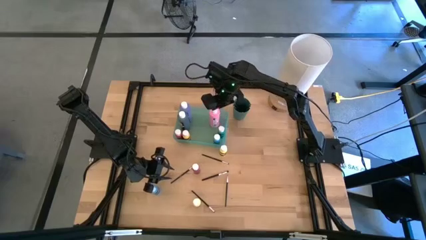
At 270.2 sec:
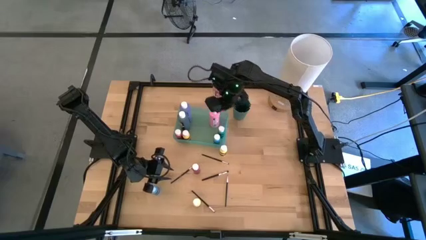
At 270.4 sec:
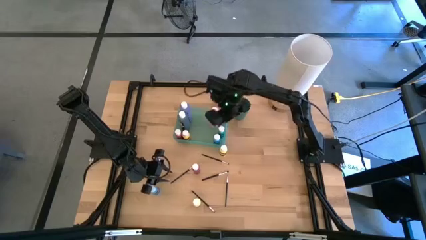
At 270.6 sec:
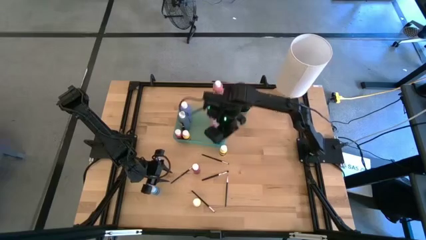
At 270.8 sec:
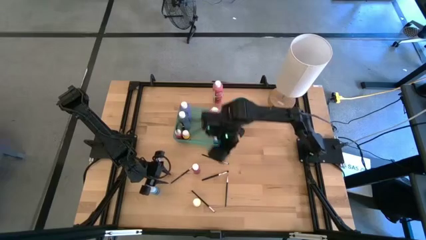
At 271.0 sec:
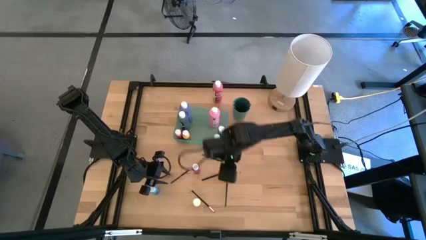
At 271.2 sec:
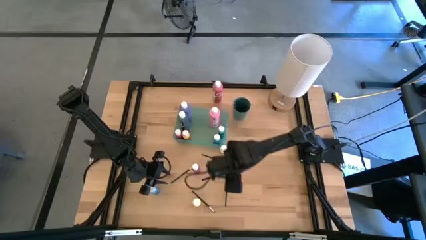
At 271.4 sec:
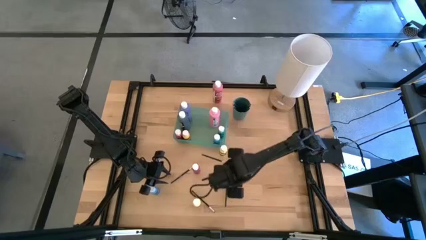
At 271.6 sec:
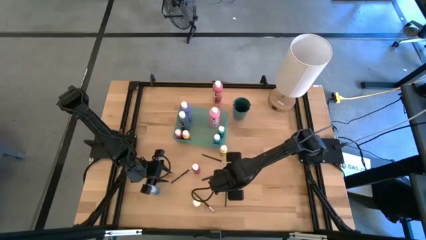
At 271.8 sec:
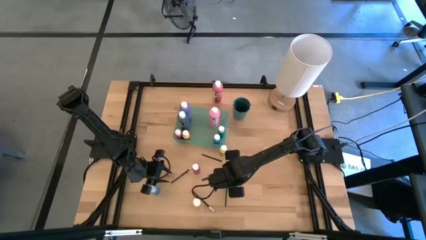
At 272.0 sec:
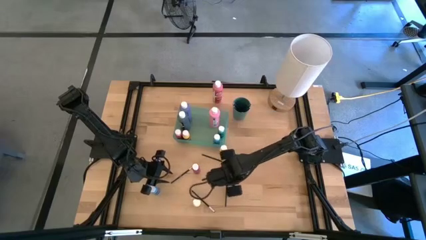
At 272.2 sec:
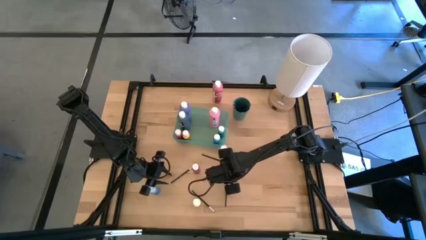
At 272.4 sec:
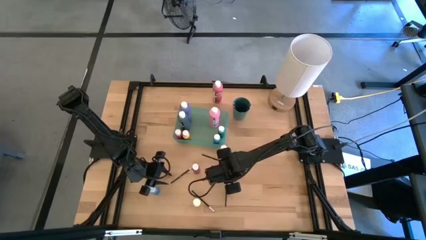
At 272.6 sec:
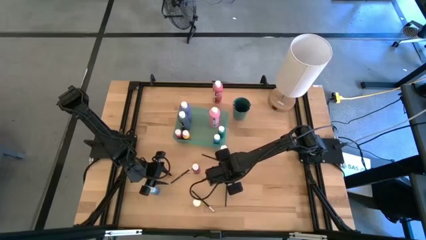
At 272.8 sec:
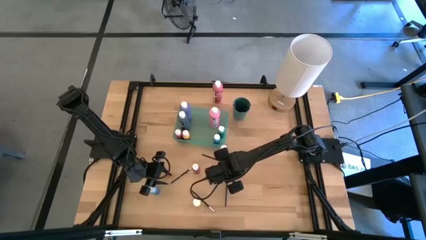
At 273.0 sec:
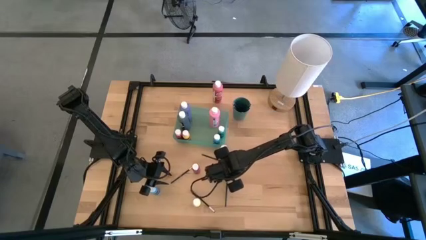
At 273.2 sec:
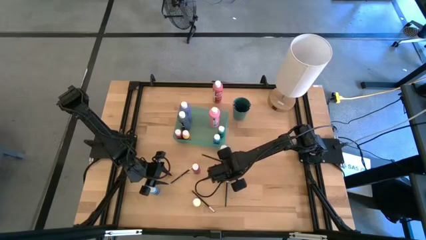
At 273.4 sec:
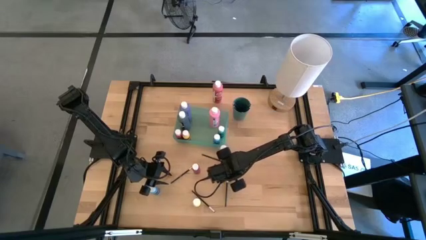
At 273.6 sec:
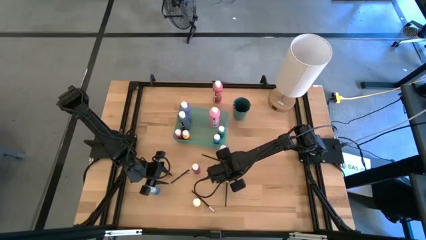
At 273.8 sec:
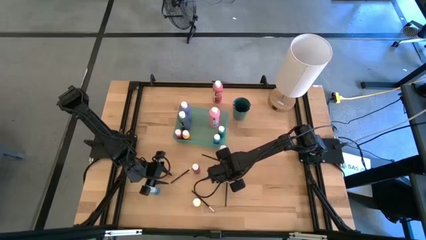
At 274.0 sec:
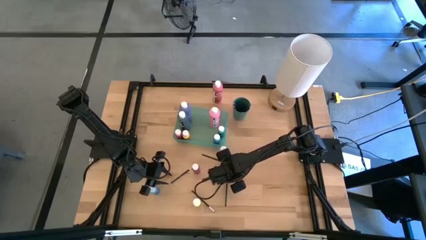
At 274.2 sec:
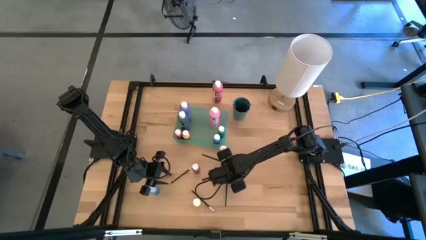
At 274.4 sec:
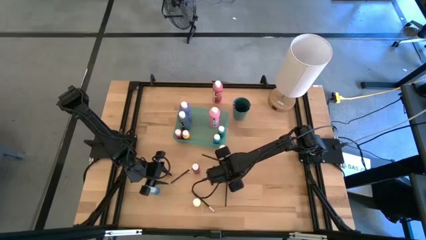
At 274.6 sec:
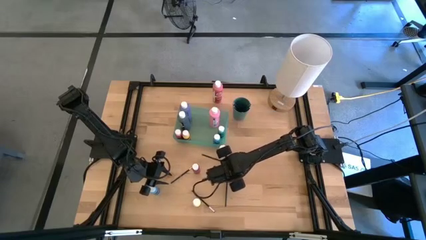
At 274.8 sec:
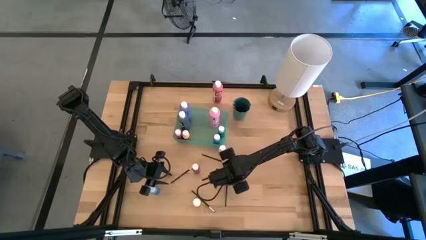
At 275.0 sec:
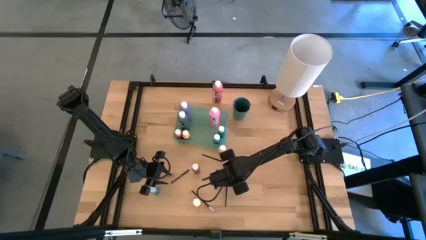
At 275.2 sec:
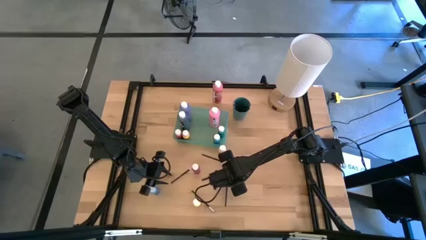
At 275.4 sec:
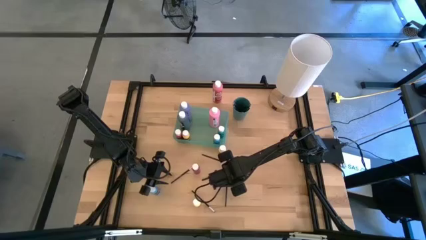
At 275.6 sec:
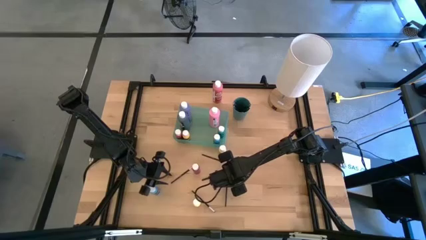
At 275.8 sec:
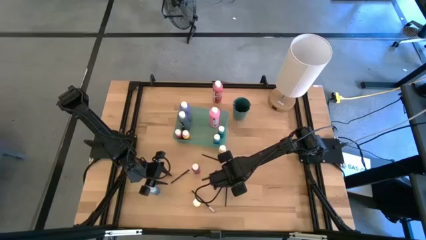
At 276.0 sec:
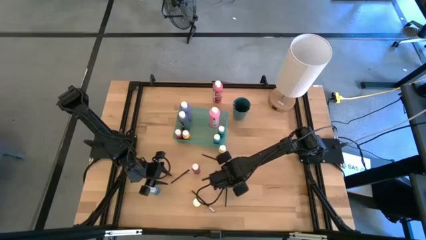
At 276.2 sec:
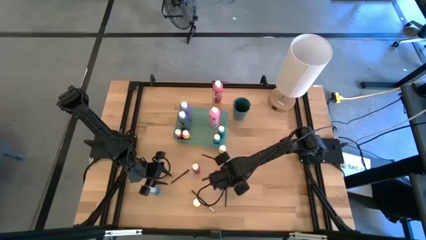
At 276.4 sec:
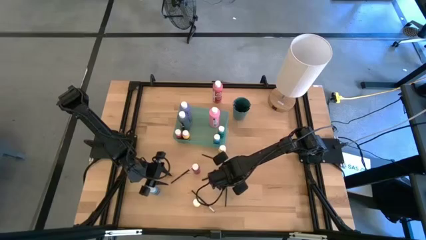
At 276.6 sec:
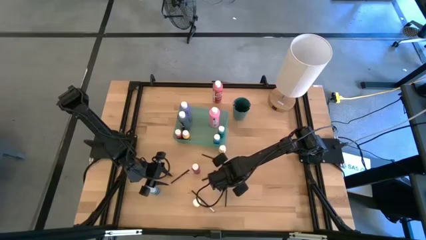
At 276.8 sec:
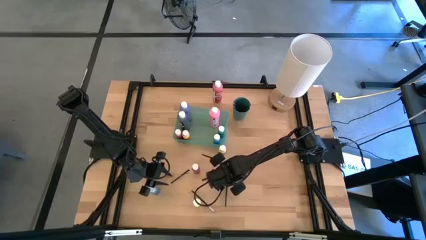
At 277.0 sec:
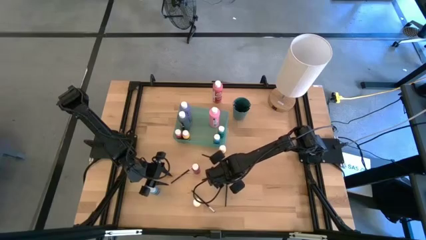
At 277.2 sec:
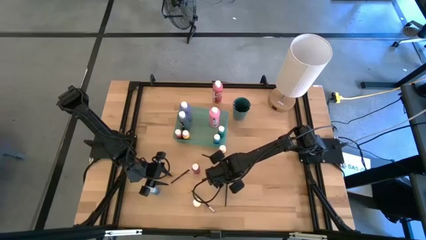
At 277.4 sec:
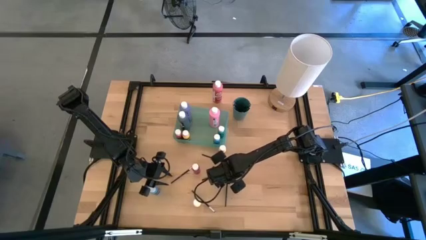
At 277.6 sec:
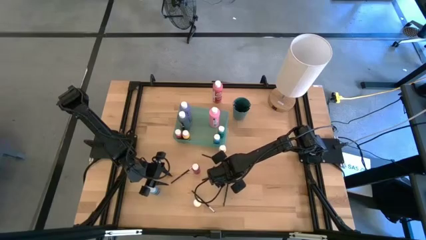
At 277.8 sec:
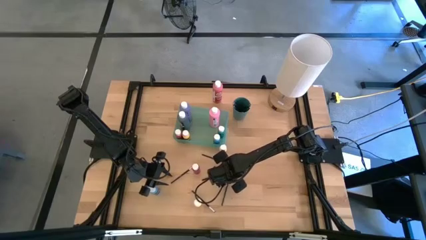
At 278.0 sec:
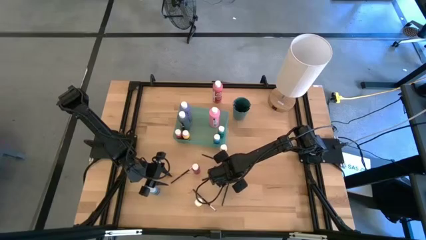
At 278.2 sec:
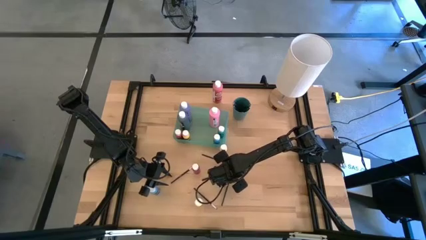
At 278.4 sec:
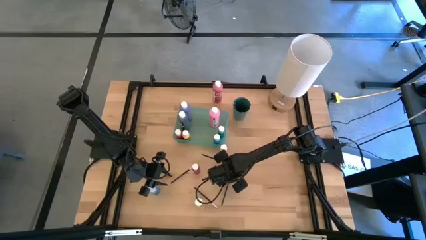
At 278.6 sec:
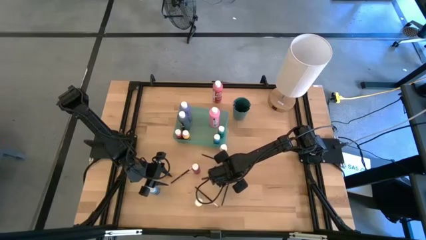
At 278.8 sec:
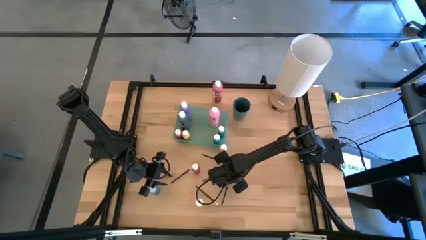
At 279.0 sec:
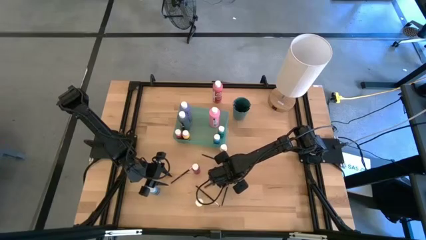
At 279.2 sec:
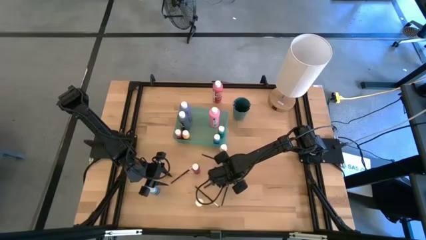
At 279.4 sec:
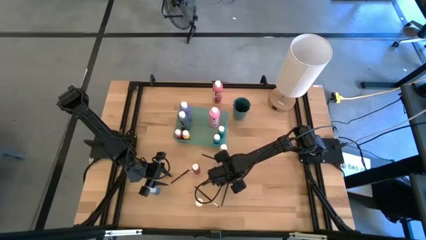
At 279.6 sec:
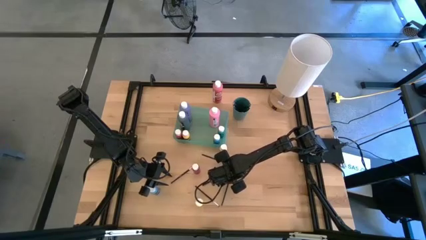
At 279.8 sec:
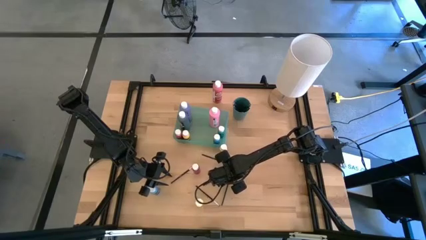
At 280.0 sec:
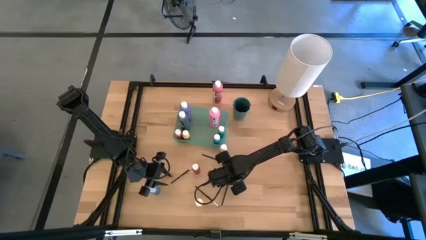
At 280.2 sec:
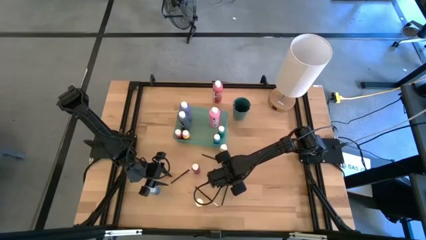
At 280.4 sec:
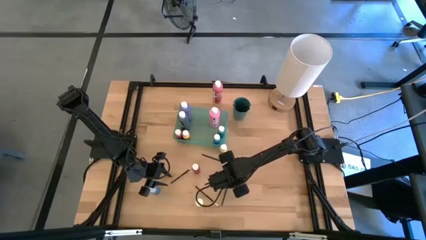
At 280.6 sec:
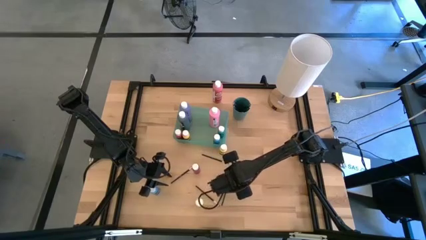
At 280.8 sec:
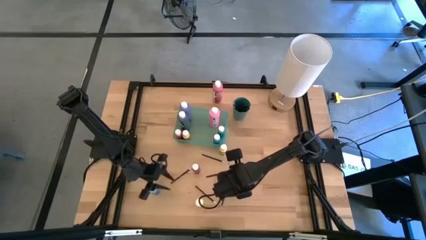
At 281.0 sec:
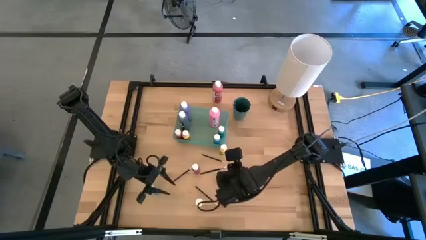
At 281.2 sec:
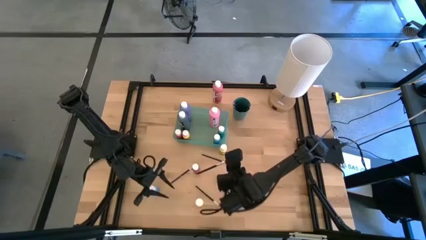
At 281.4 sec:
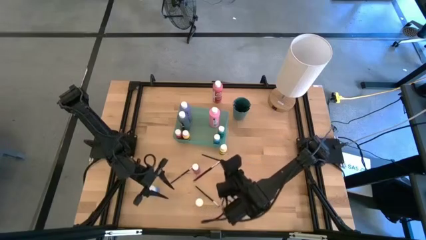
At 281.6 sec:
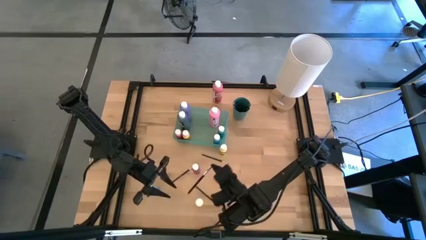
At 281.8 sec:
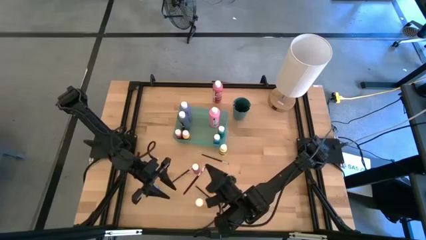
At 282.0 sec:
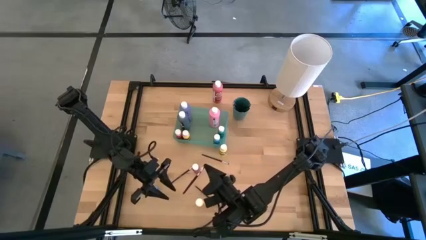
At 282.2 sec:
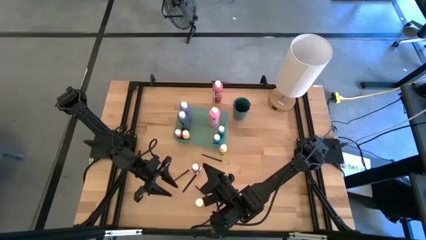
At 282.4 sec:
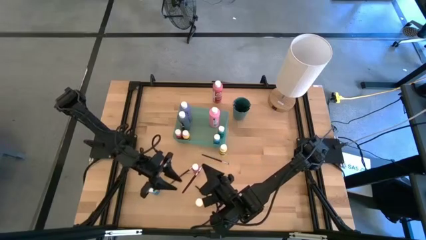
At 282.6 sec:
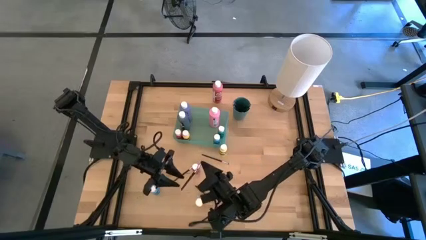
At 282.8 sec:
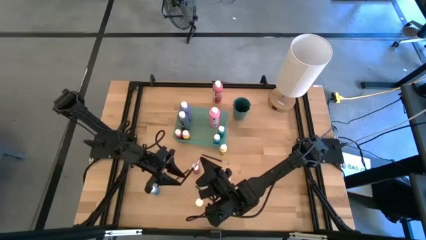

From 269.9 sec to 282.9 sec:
Task: Pick & Place Paint Supplies
Put the black paint brush into the dark green cup
